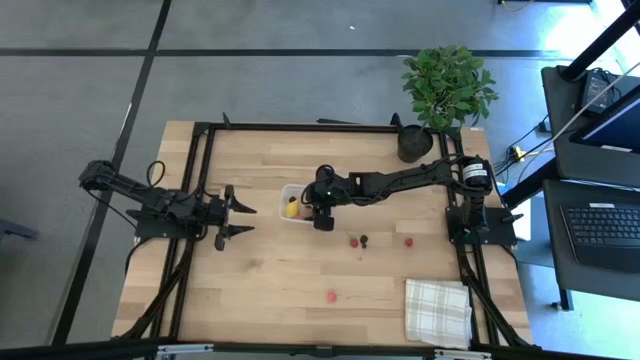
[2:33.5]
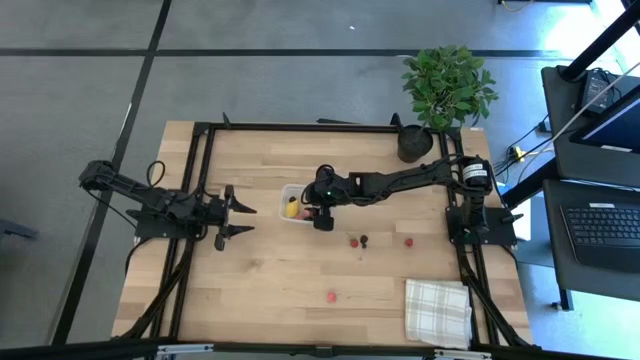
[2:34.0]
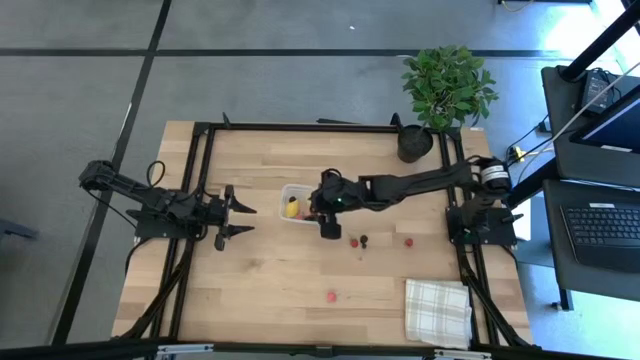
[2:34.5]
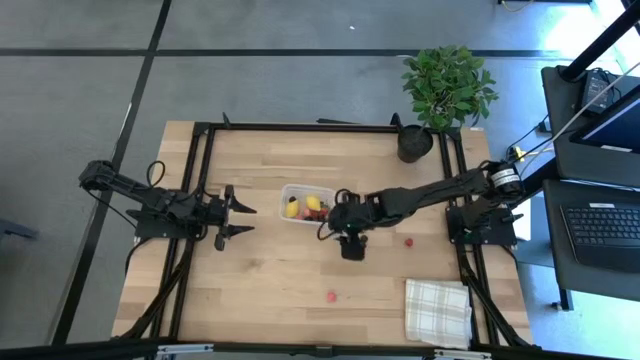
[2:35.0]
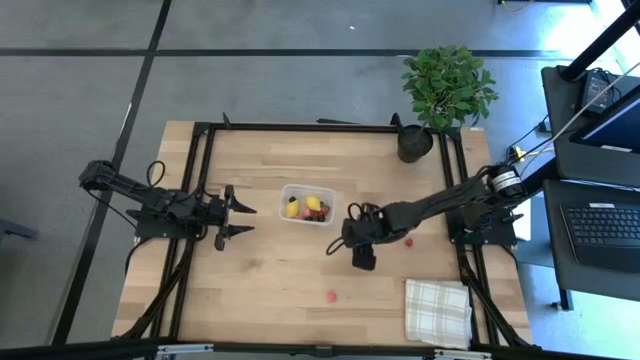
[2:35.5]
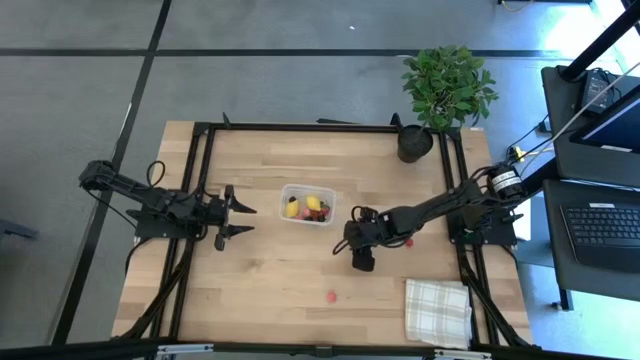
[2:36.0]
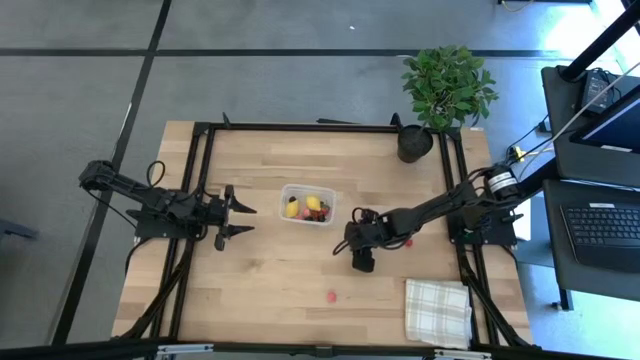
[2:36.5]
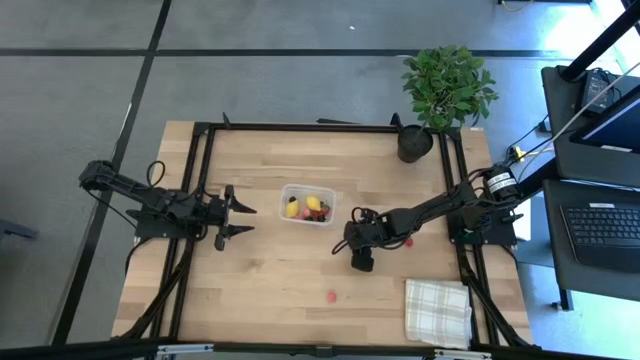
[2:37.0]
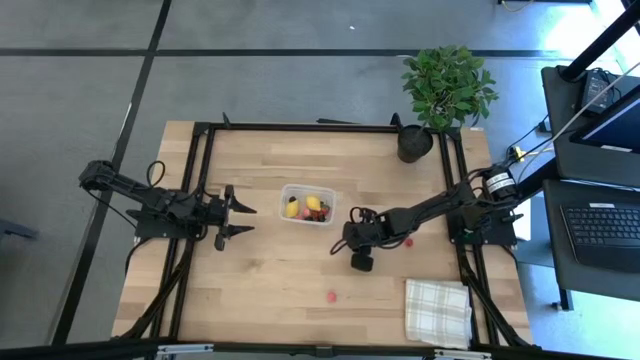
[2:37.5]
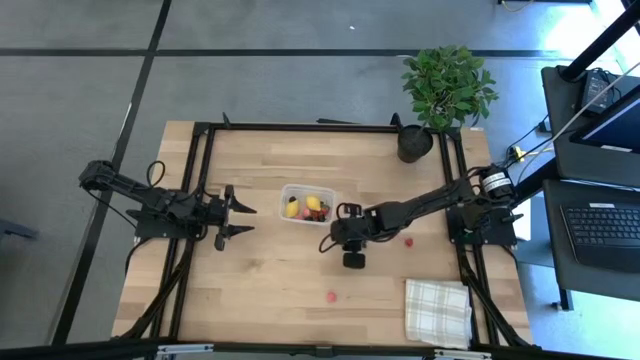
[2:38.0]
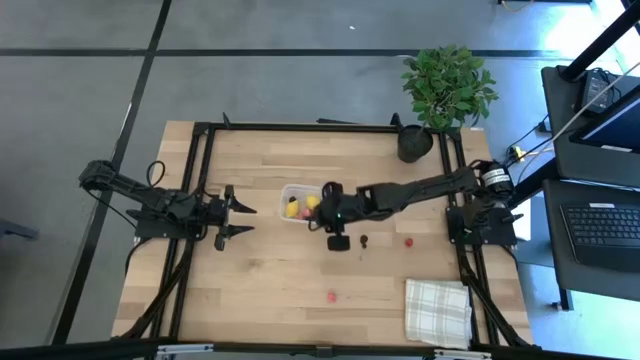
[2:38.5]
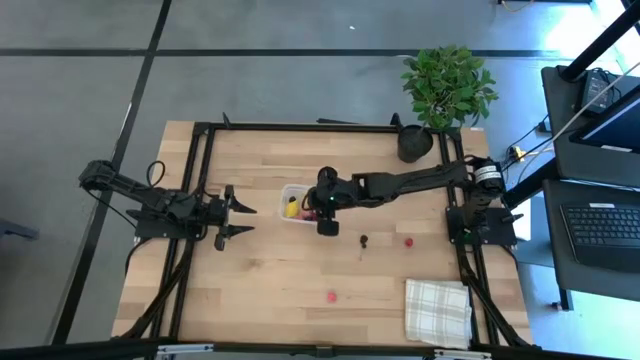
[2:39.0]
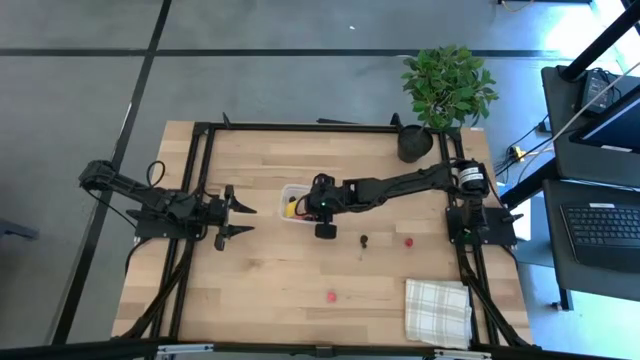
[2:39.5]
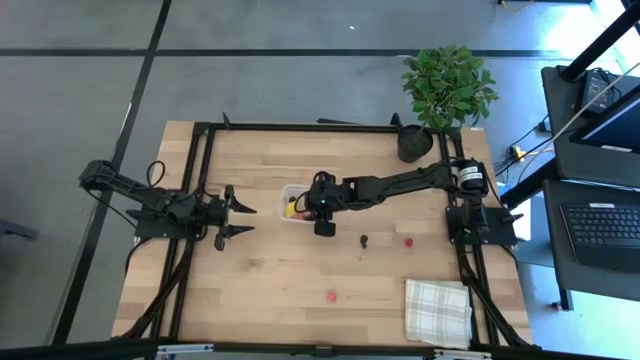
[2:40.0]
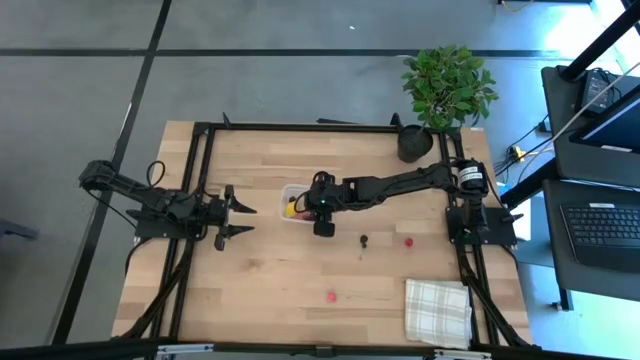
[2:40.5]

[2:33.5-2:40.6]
Task: Pick and placing Produce into tupperware
Put the strawberry into the transparent bin

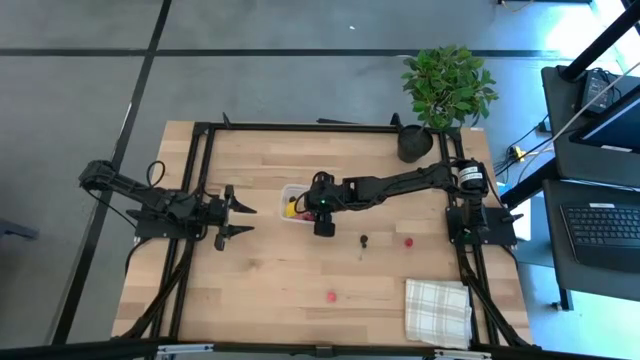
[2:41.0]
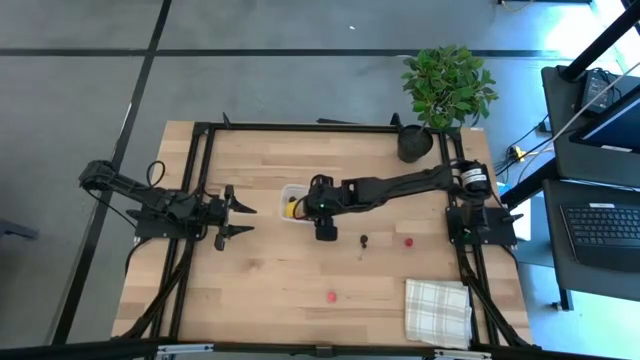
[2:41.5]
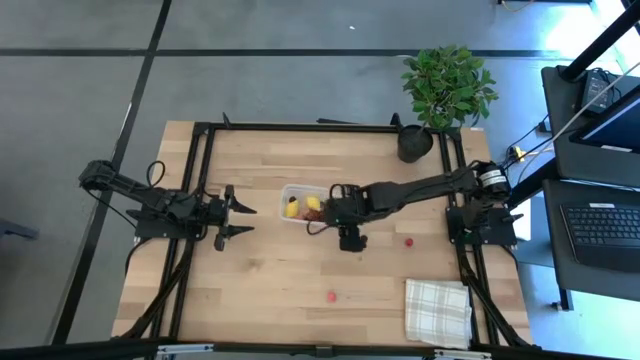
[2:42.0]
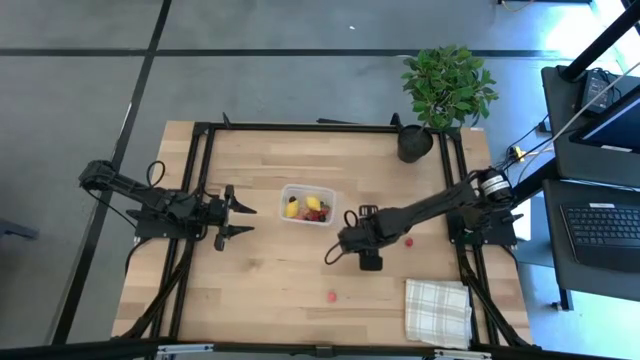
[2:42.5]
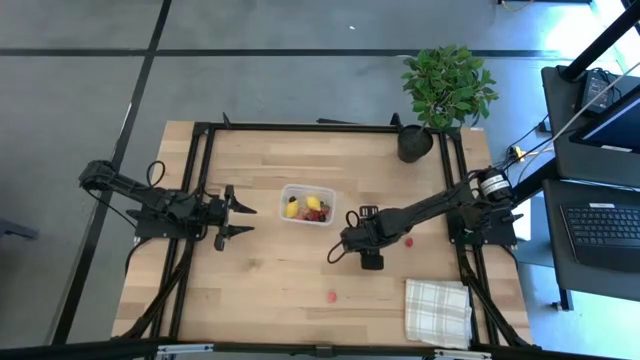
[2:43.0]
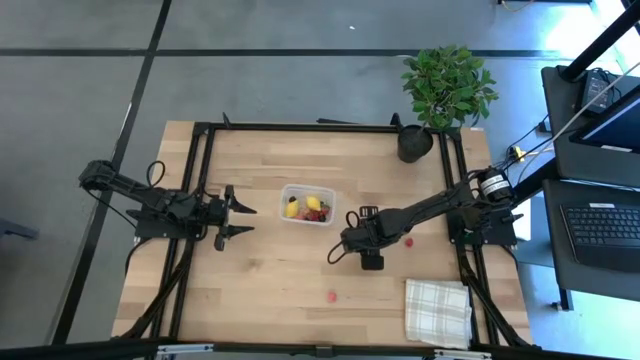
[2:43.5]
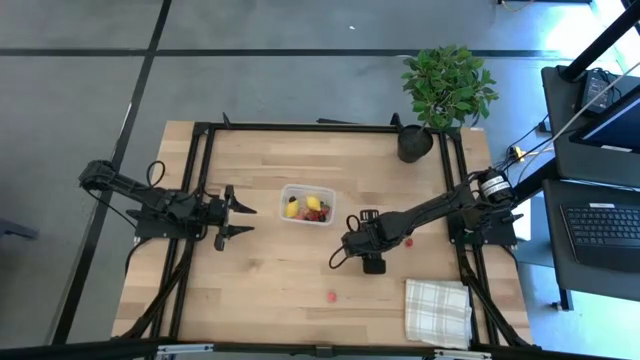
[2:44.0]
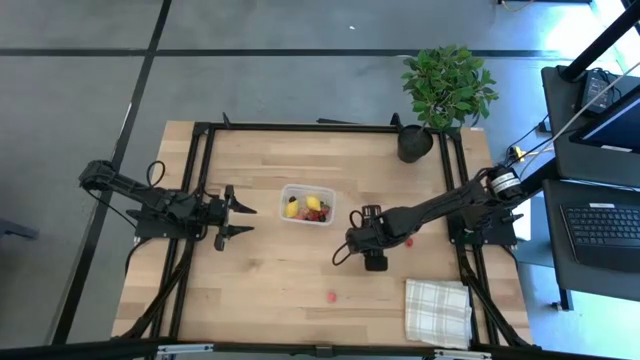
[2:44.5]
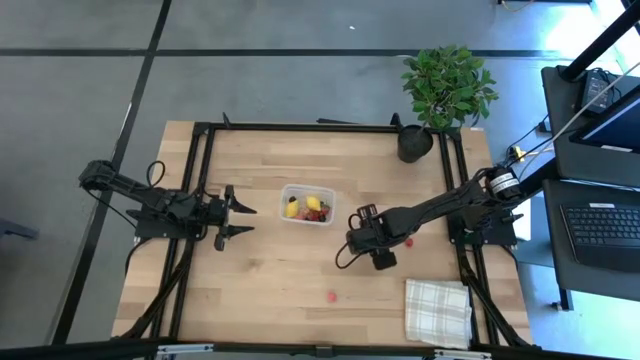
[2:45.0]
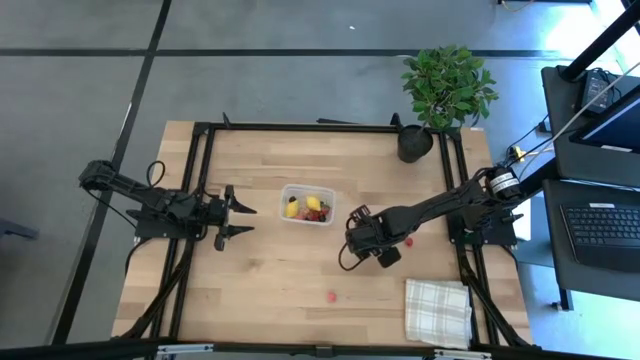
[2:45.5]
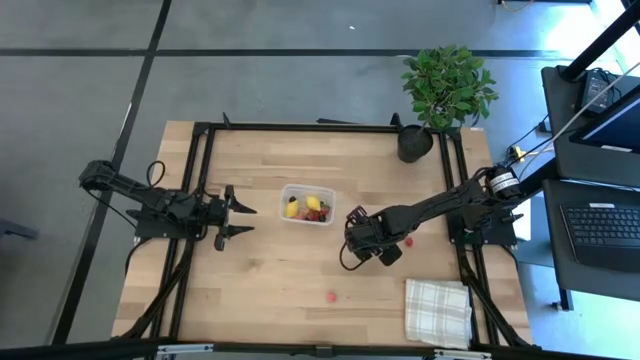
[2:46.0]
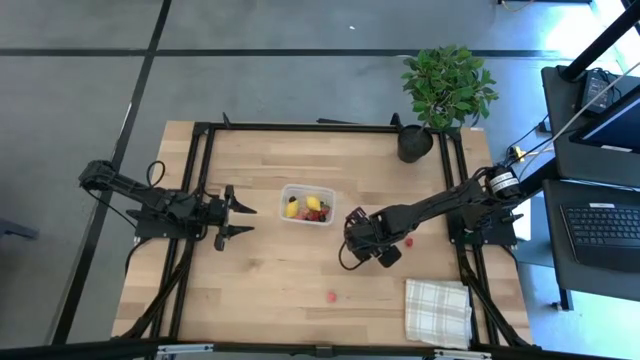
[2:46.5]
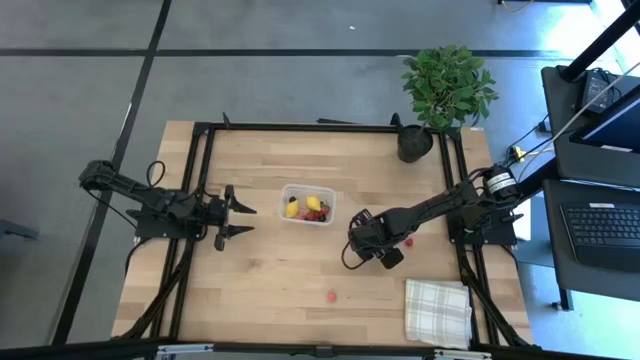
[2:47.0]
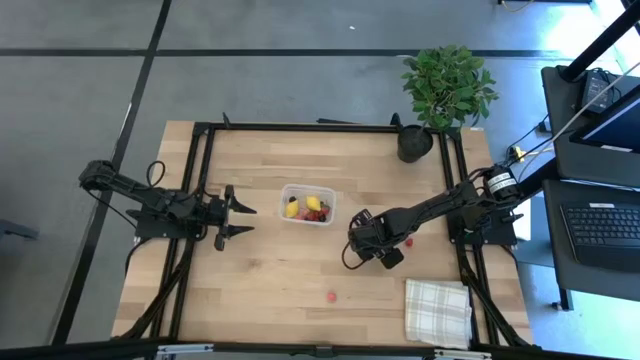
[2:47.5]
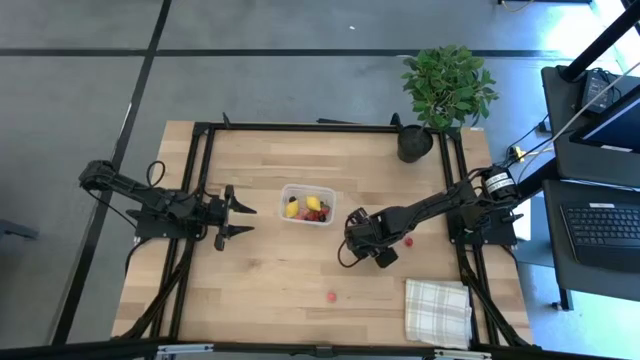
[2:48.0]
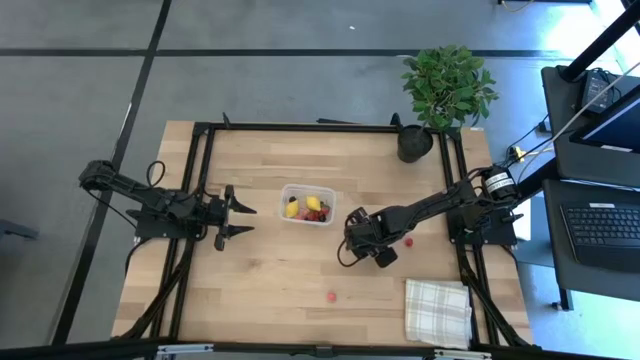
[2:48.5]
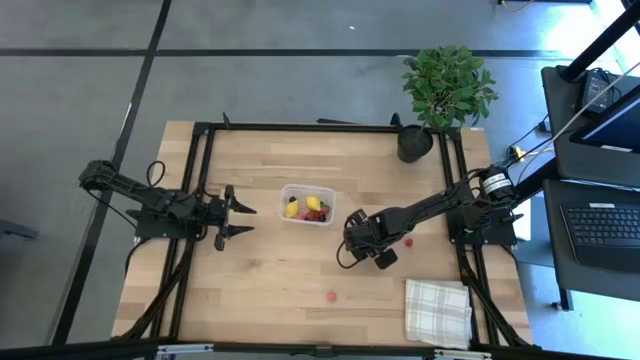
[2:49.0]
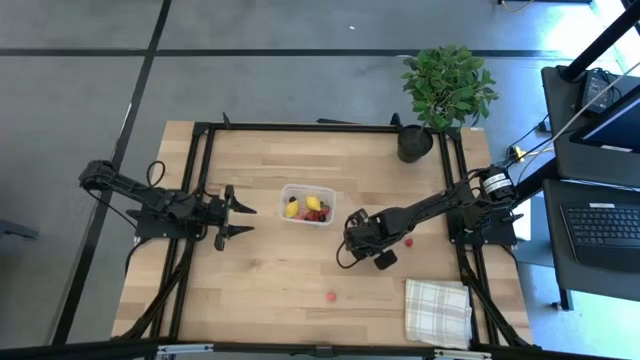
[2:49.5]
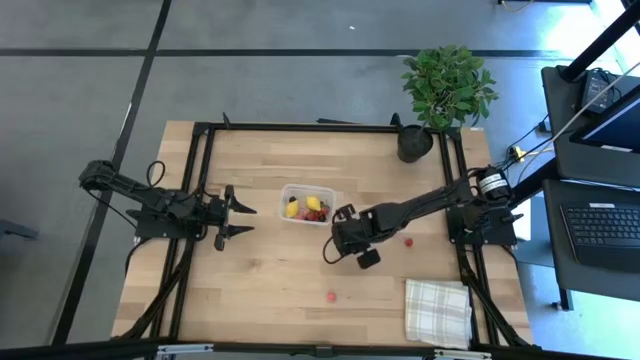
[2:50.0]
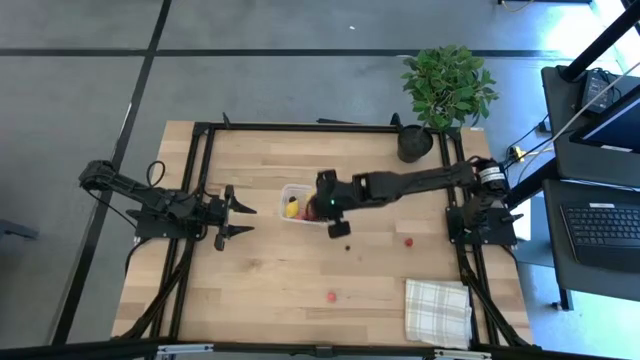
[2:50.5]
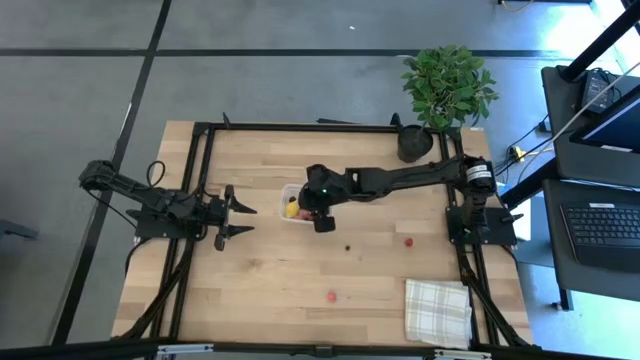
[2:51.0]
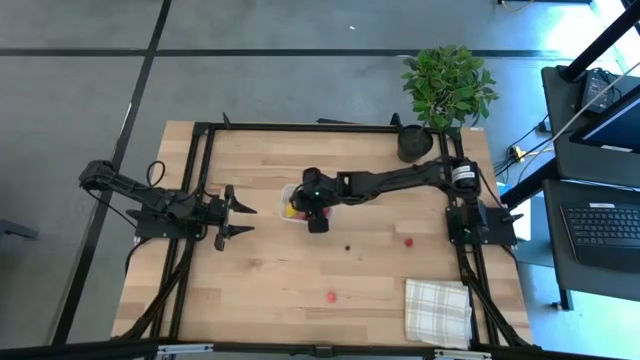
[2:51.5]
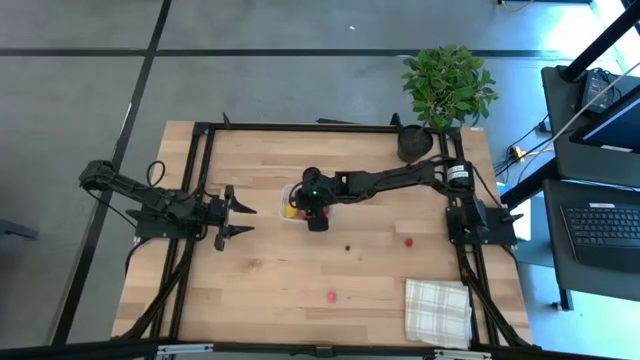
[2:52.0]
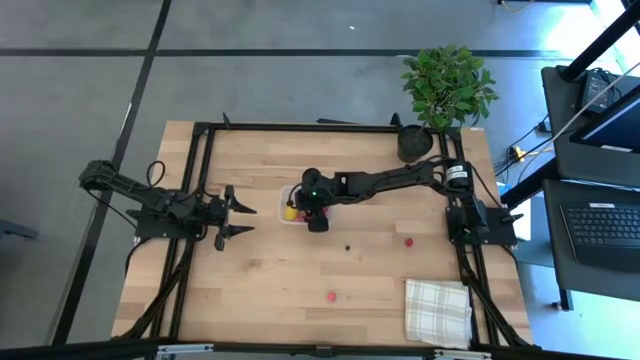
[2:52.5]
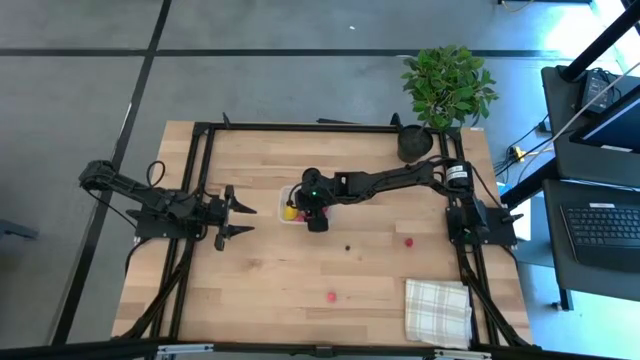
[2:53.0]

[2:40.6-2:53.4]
Put the blackberry into the transparent bin
